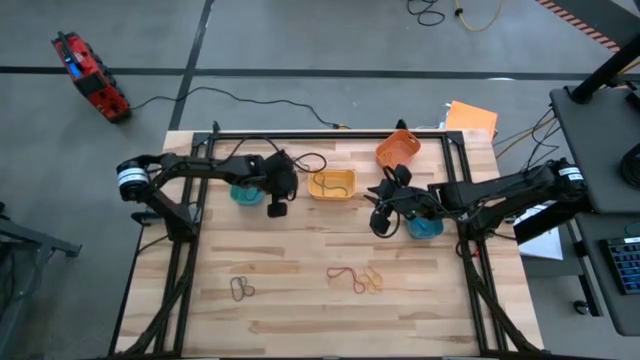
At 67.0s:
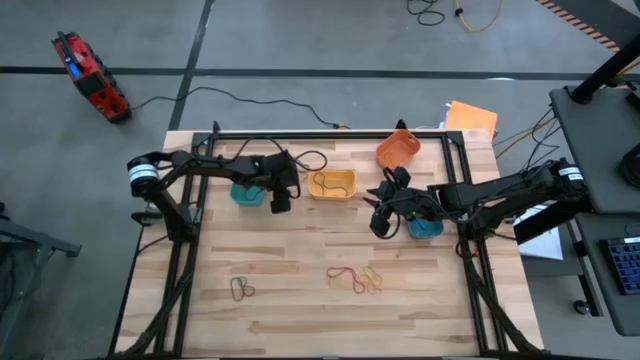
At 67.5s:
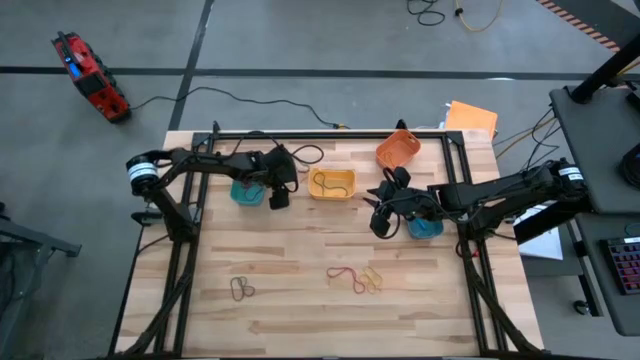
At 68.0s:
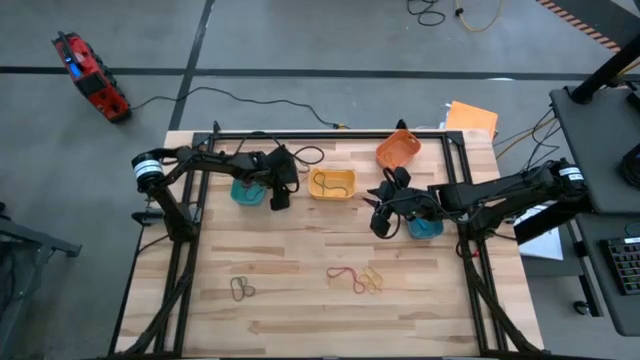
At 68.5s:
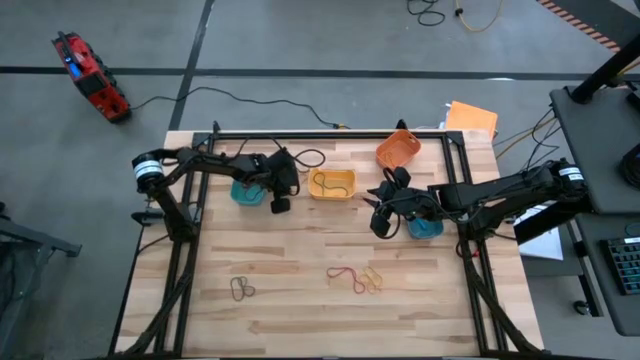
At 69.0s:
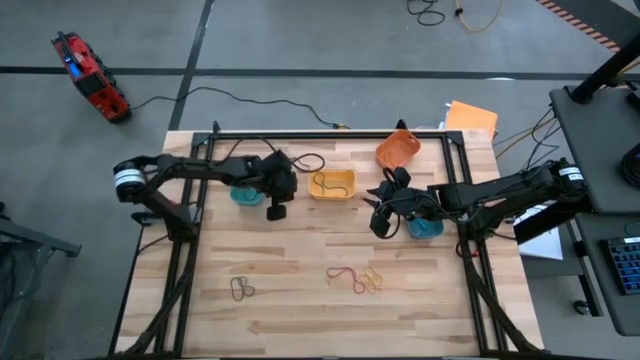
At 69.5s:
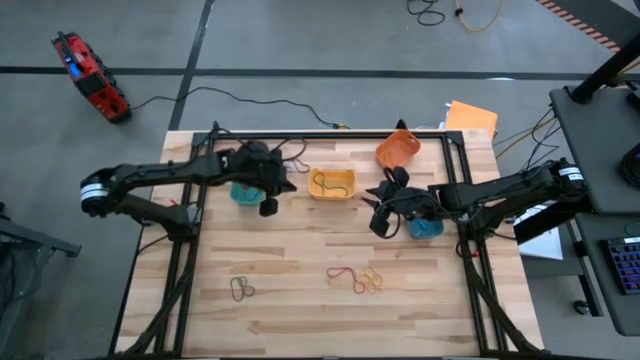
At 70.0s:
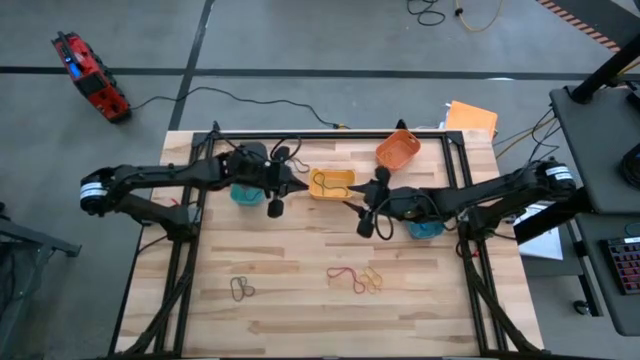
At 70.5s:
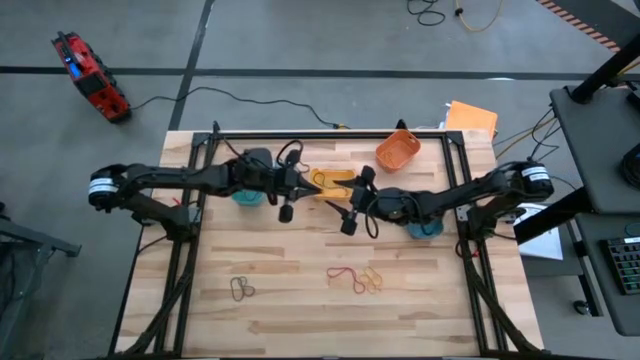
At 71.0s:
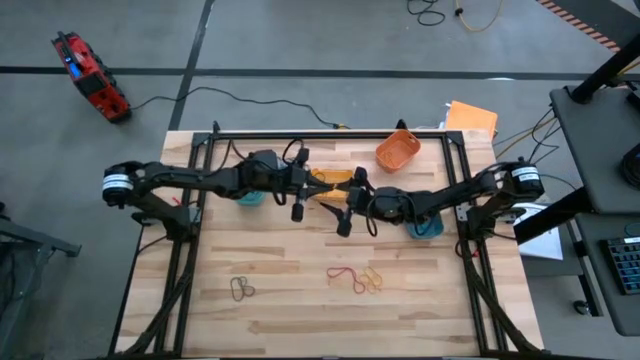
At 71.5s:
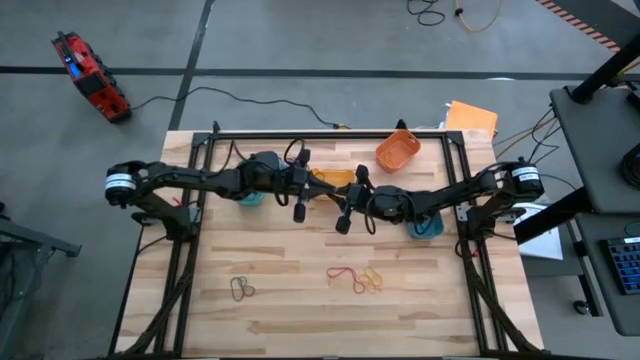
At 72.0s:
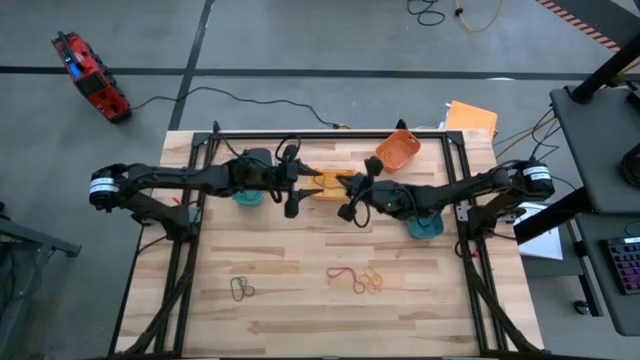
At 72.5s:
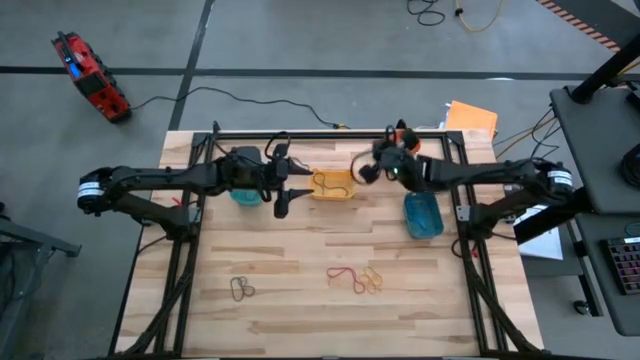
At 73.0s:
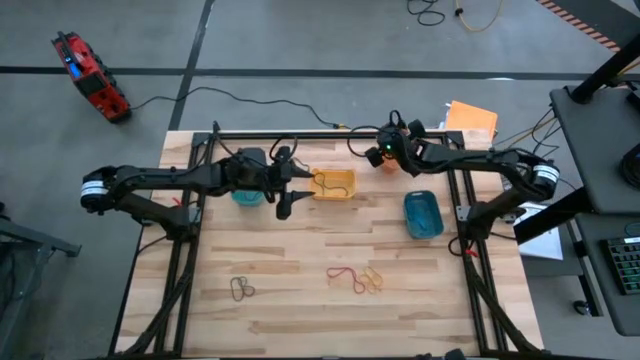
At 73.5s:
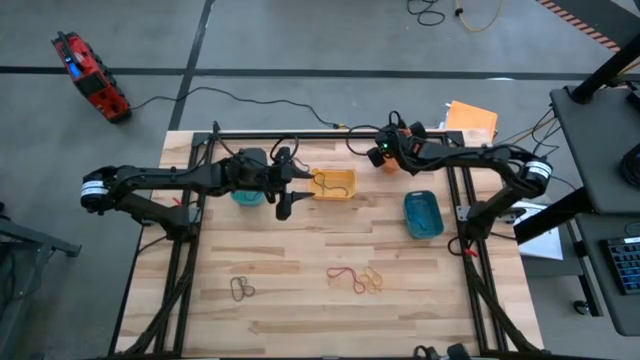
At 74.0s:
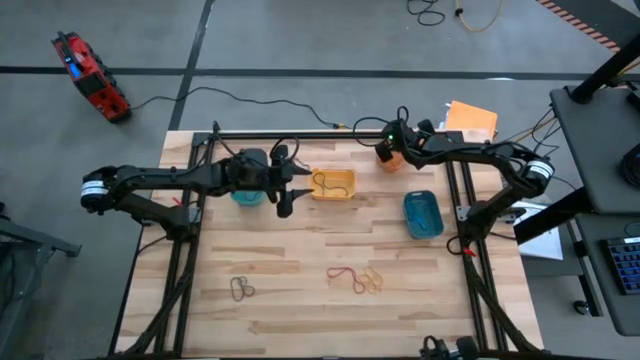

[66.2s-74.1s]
Task: Sort rubber bands into baskets
Put the yellow rubber band into the orange bin

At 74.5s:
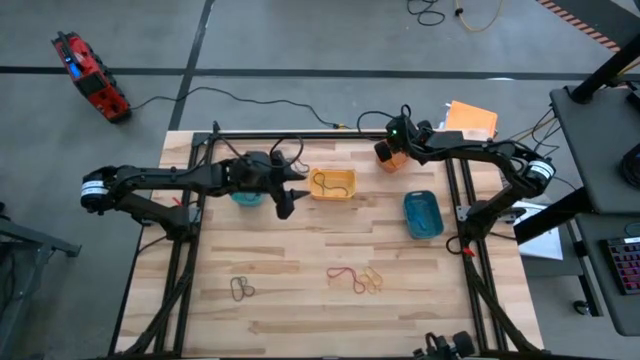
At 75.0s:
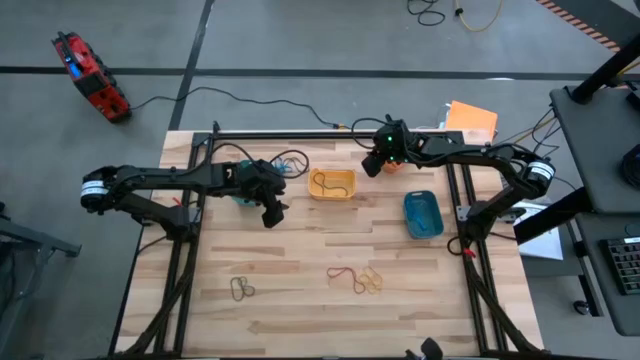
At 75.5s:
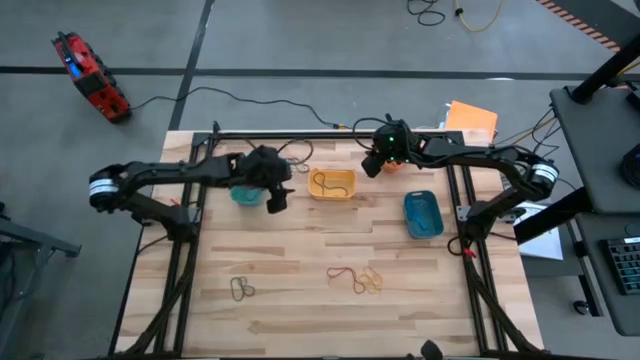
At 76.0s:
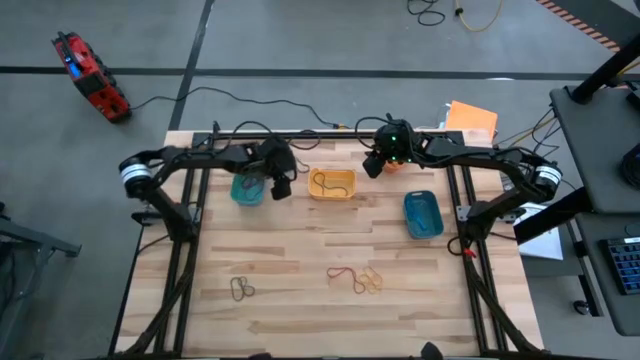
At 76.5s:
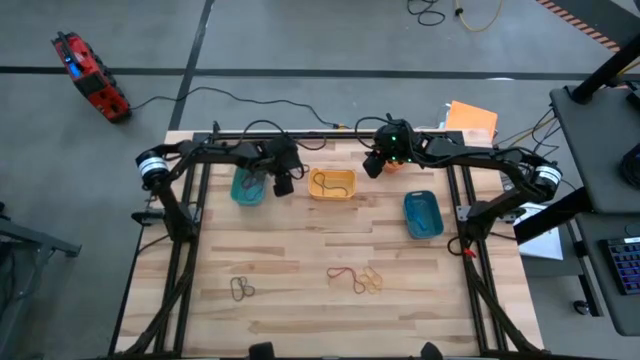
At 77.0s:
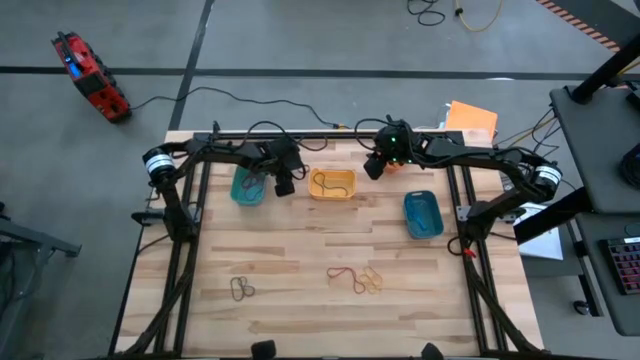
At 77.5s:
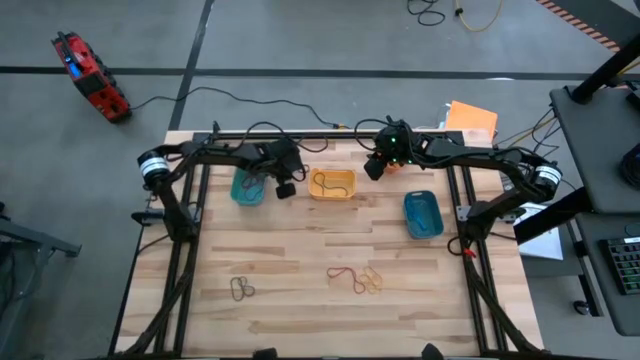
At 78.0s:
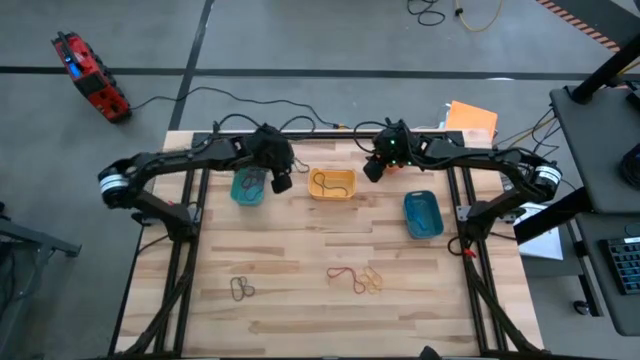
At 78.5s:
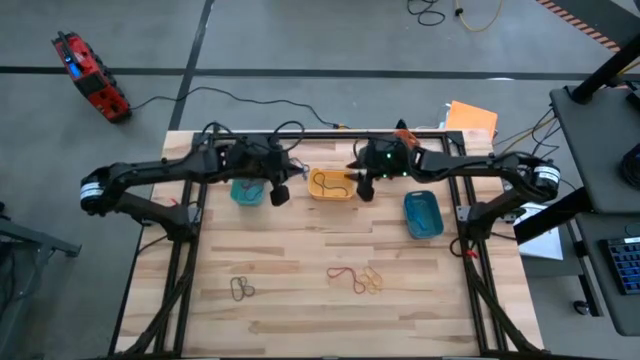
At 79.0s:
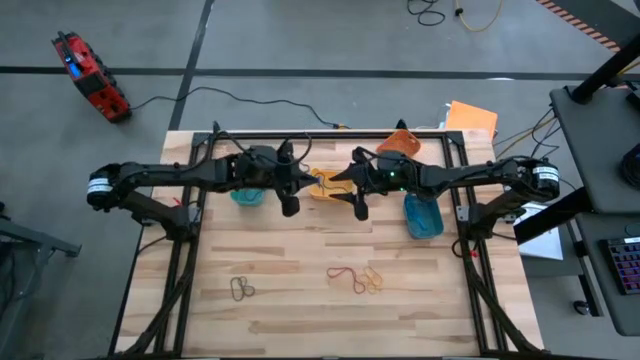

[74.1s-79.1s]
Put the blue rubberband into the blue bin

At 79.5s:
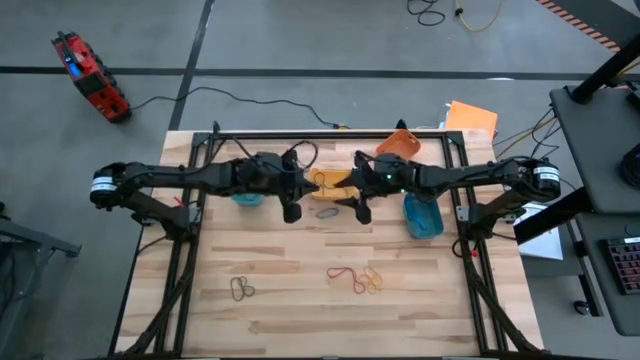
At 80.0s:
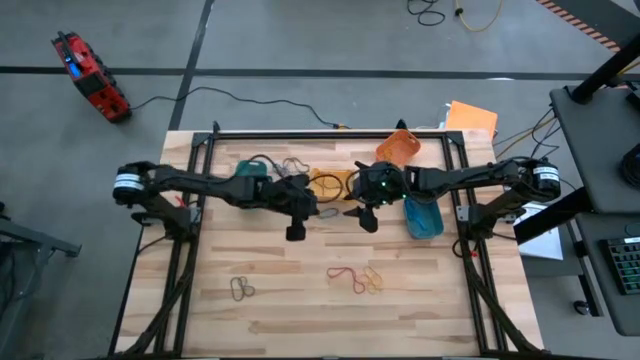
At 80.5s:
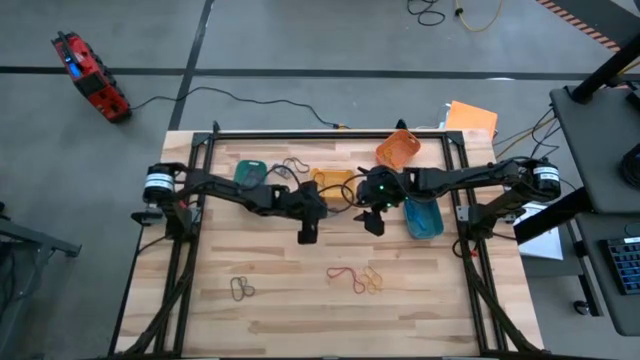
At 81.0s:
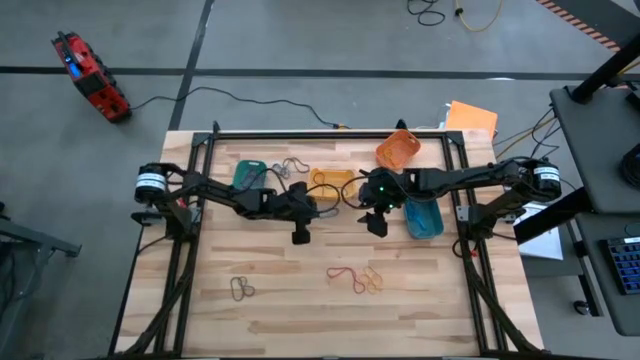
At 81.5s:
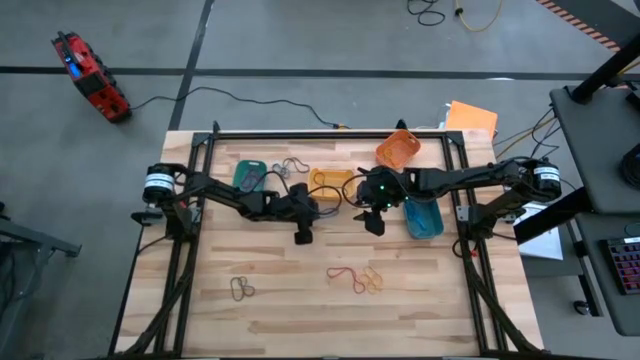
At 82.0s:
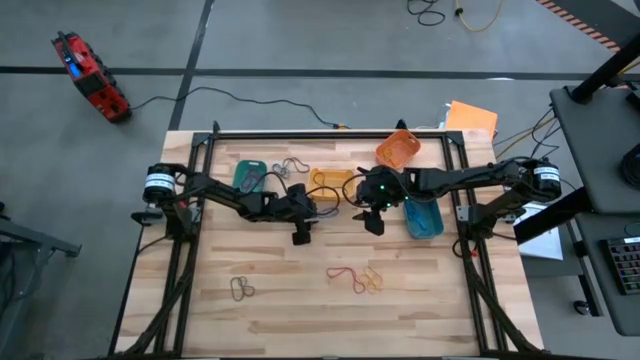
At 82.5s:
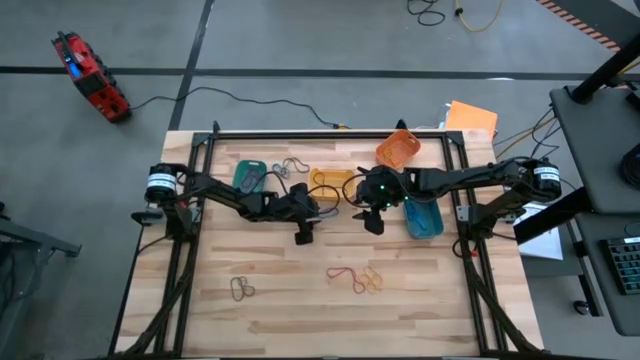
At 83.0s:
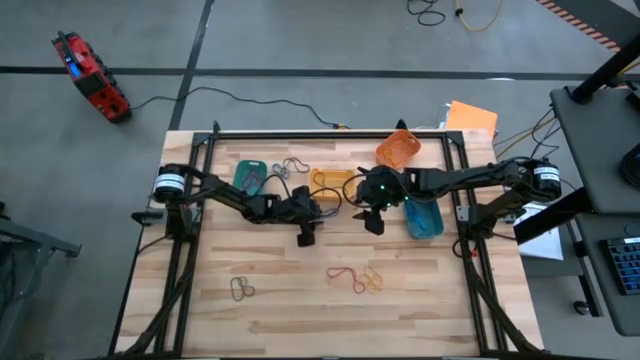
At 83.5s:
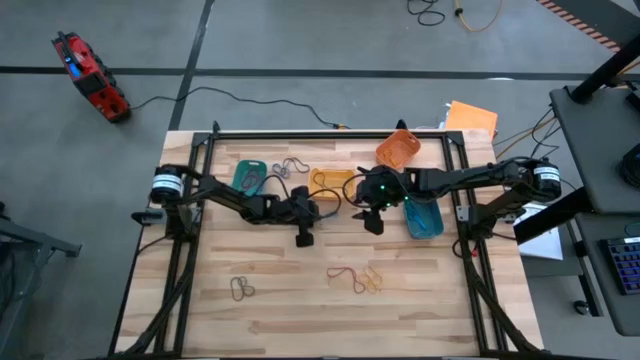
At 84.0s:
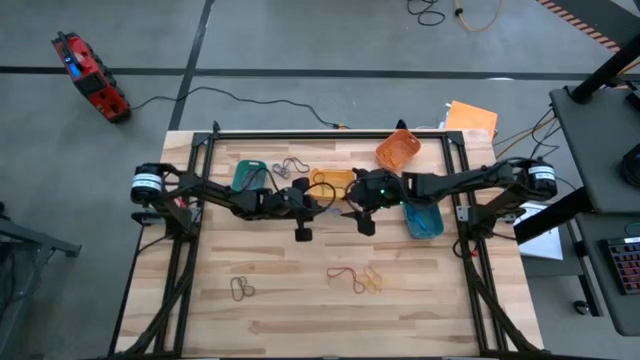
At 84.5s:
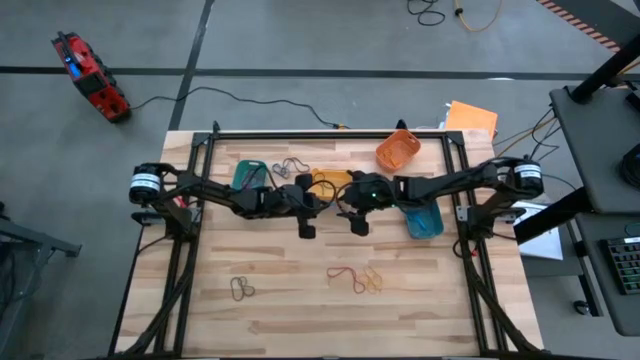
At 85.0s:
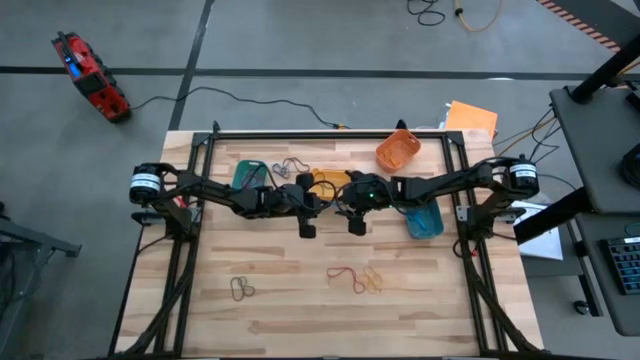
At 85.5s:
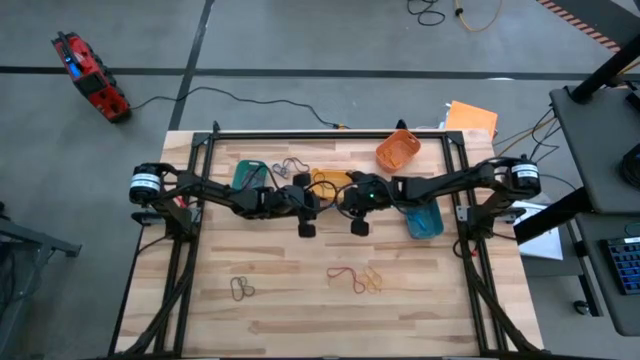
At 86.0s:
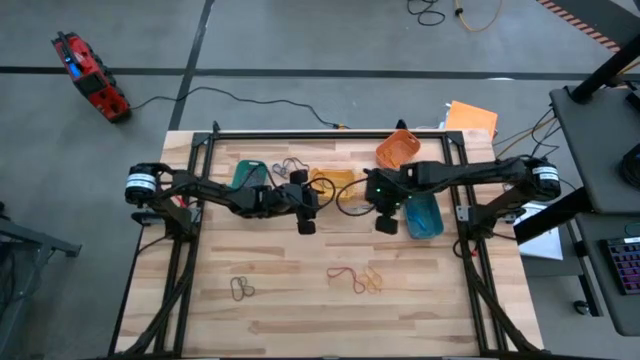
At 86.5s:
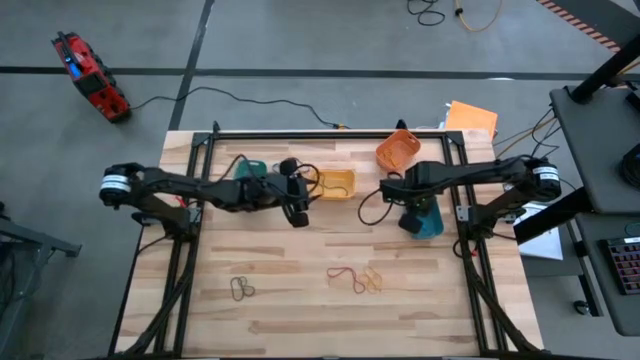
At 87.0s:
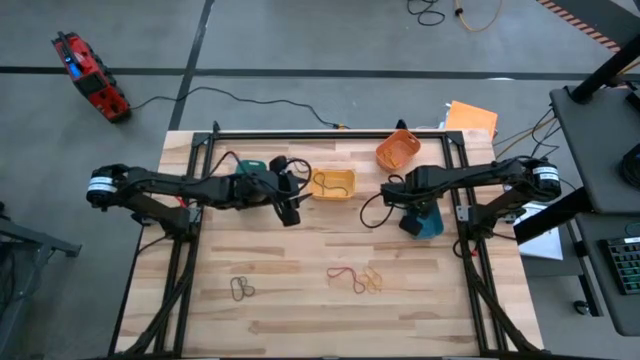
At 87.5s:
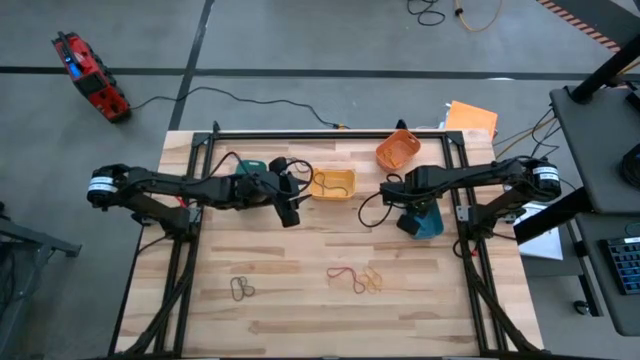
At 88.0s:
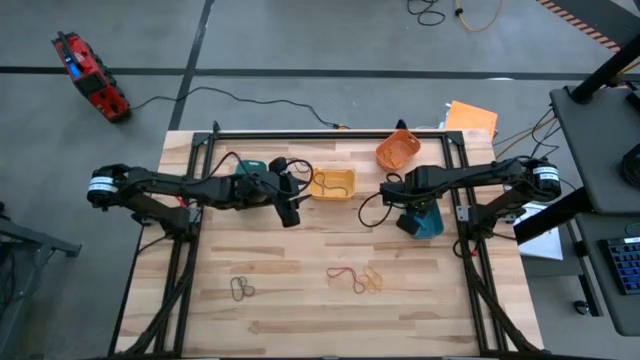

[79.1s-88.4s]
Put the blue rubberband into the blue bin

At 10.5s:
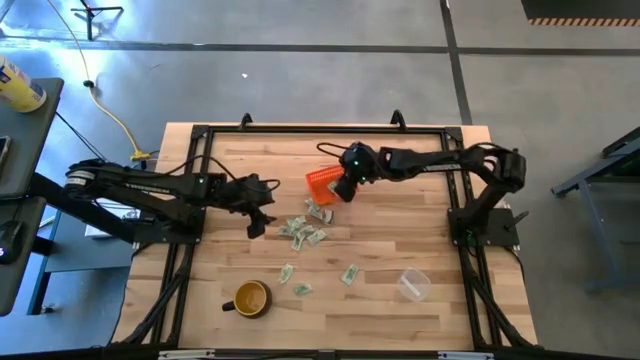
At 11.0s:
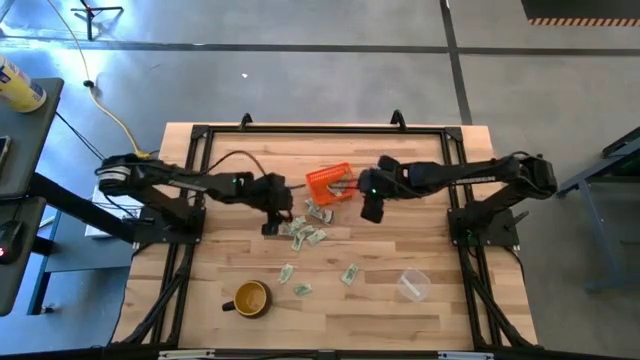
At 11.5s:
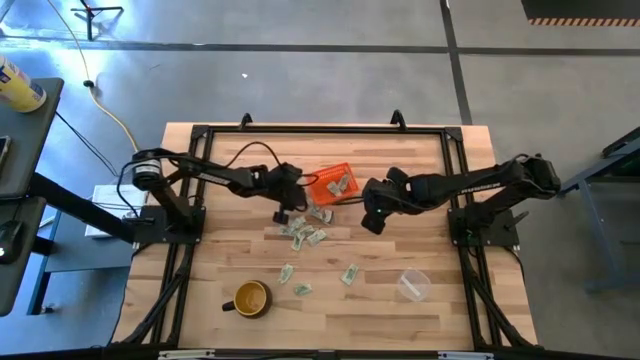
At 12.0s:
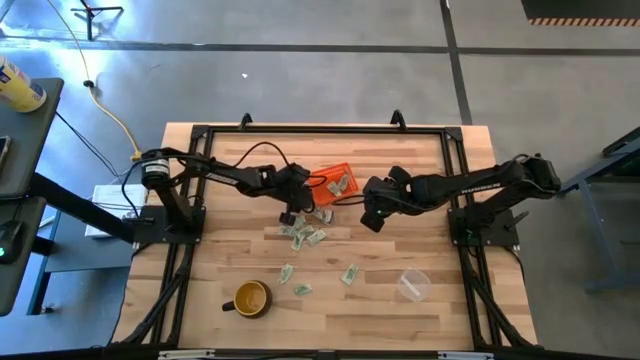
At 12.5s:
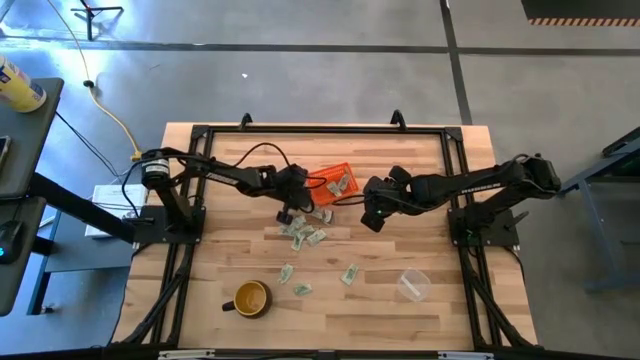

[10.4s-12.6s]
Task: Pick and place items into bin
Put the white stevia packet into the orange bin
